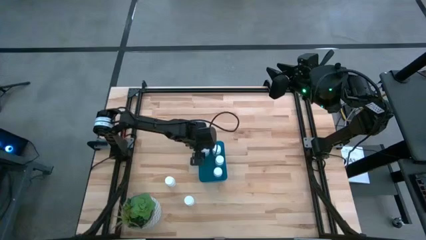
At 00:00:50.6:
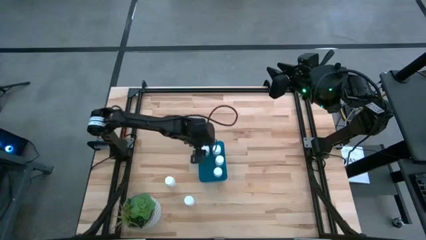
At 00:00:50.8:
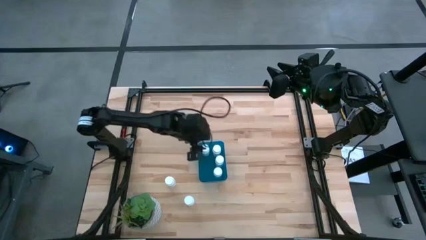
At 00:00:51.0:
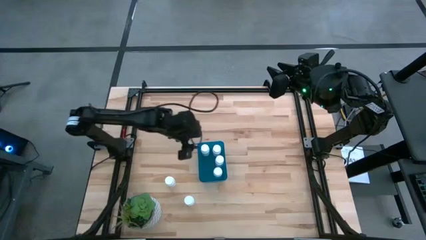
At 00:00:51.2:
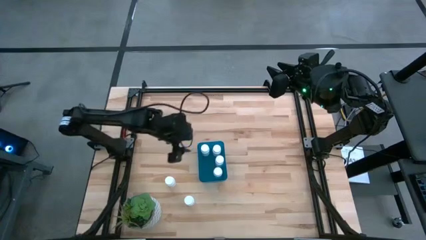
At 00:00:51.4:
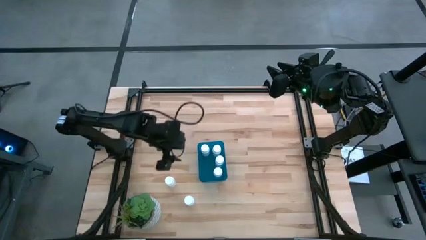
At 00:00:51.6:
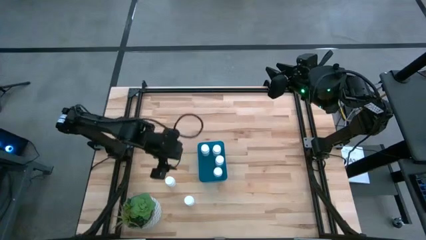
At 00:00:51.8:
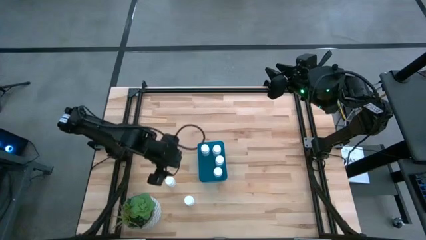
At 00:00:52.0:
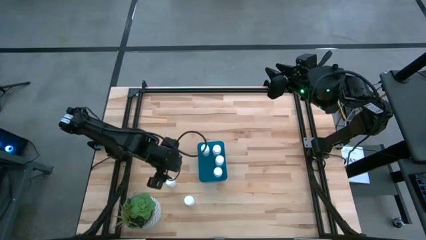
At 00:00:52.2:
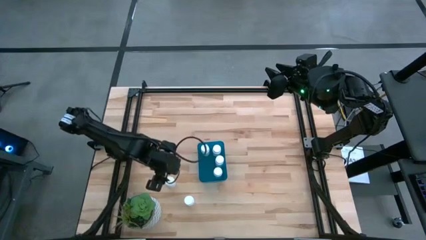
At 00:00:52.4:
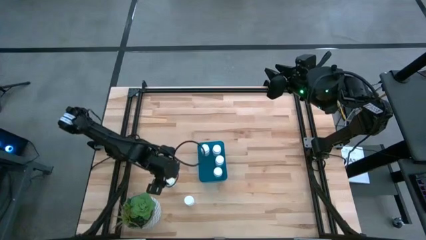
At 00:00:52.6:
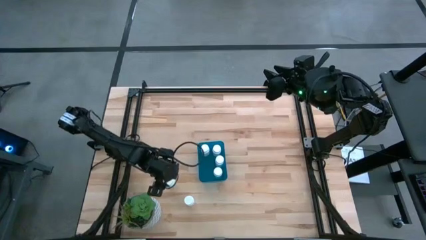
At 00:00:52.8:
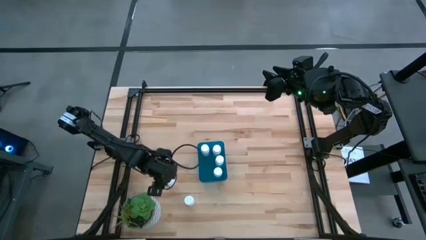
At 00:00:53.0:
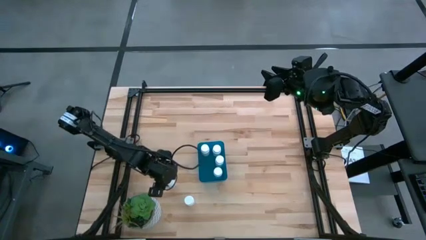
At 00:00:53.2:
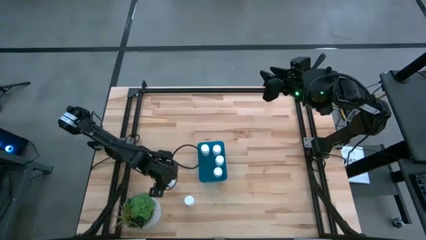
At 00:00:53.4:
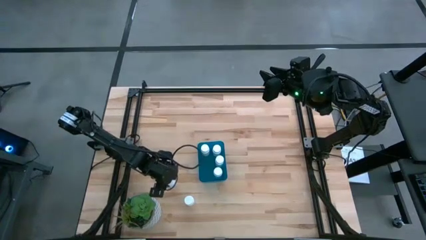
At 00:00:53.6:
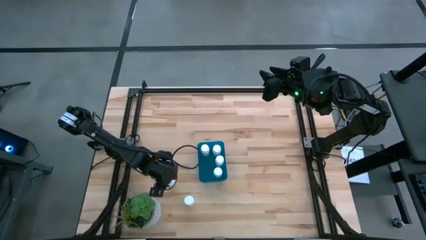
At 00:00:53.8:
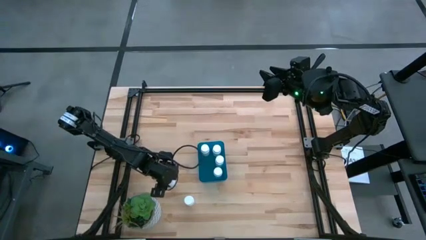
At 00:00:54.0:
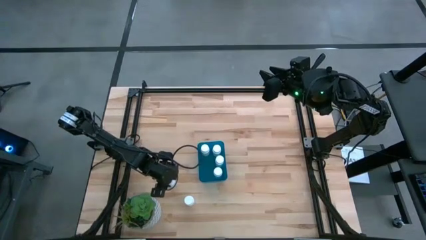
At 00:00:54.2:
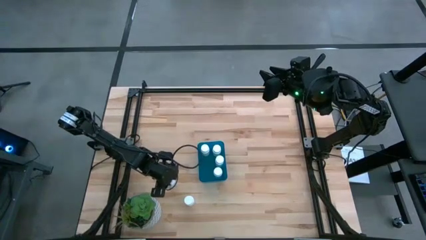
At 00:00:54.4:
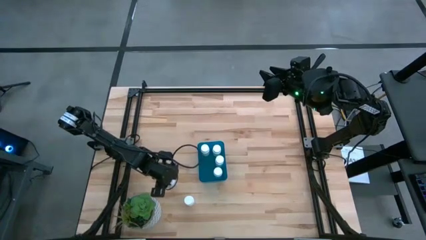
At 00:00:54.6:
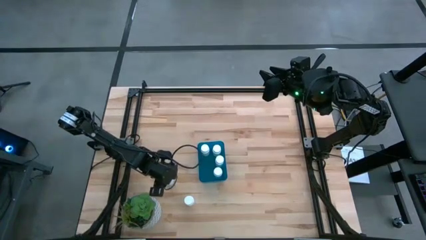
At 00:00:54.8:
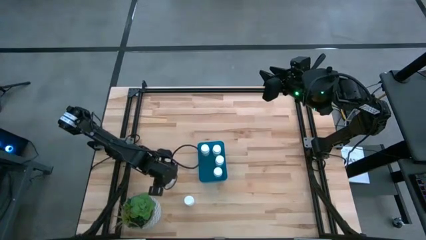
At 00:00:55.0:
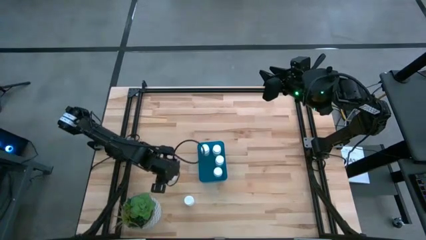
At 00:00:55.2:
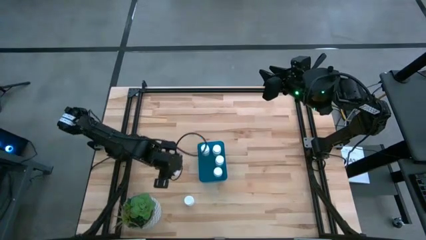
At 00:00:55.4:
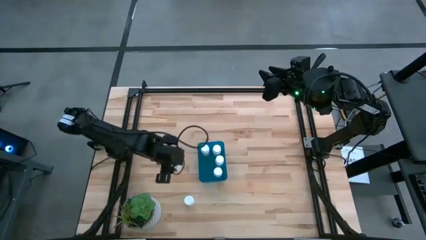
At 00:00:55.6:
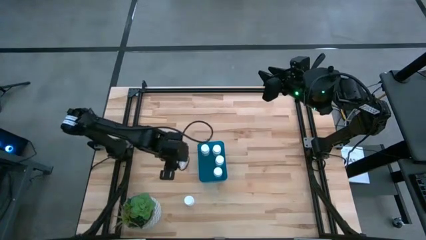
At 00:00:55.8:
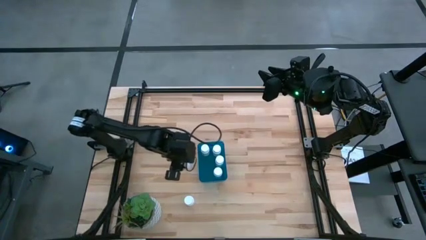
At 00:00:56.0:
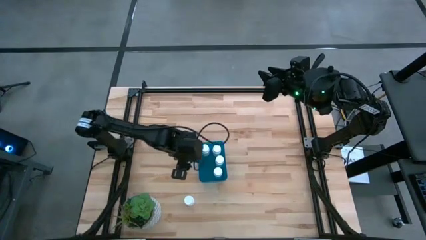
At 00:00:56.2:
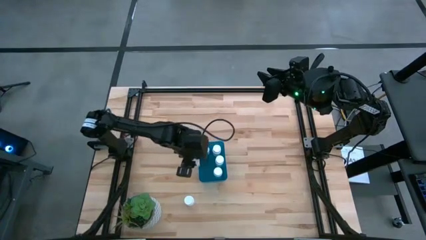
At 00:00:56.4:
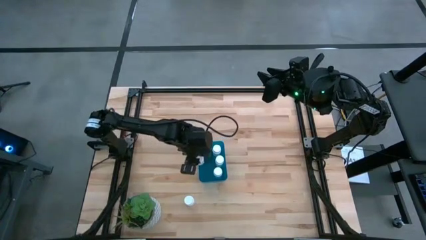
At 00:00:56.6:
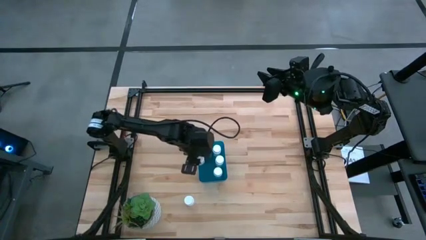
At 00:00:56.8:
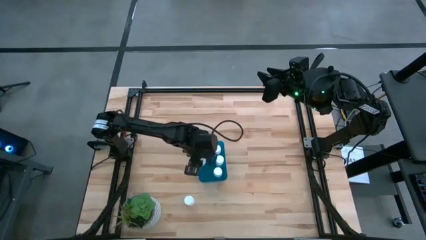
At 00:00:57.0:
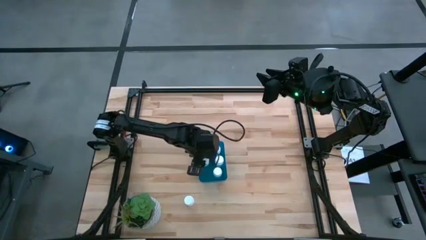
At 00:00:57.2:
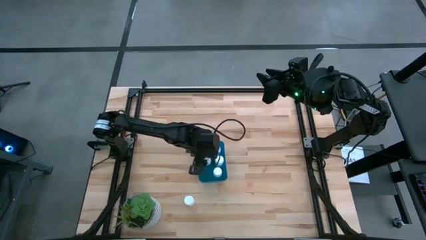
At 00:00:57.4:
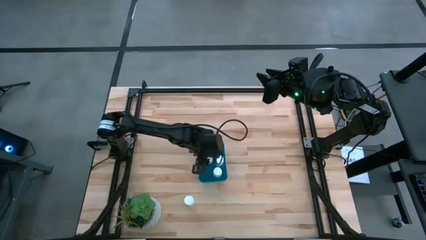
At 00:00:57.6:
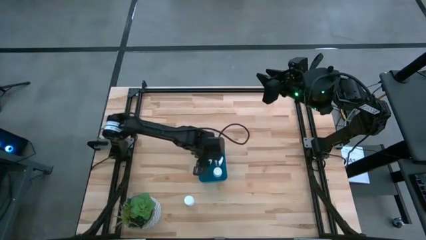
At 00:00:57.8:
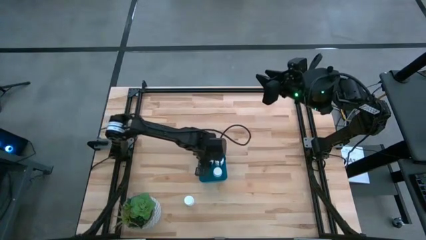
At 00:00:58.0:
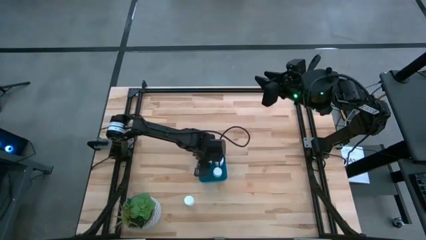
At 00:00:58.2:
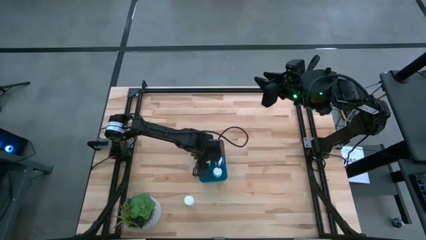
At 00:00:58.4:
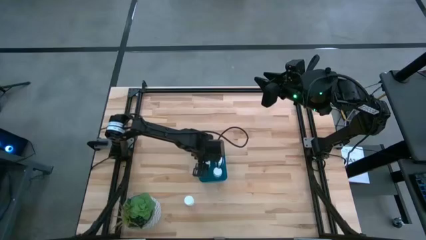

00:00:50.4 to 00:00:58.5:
Task: Pick and place pill bottles into a basket
Put the top pill bottle into the bin

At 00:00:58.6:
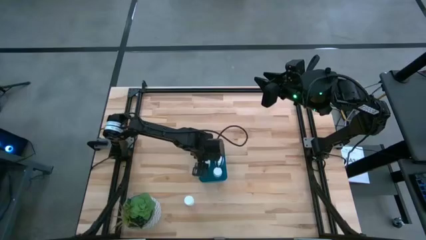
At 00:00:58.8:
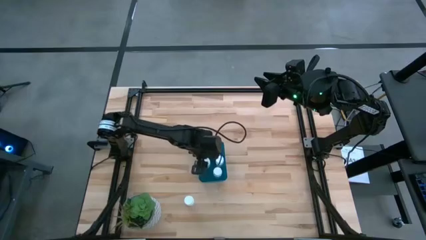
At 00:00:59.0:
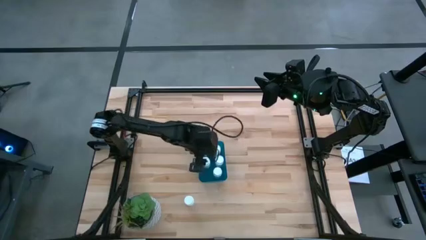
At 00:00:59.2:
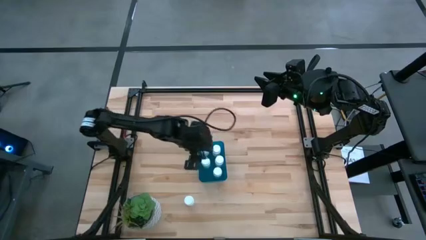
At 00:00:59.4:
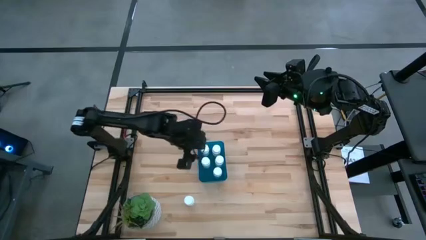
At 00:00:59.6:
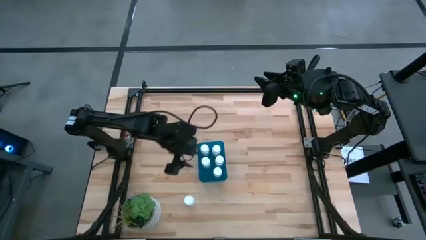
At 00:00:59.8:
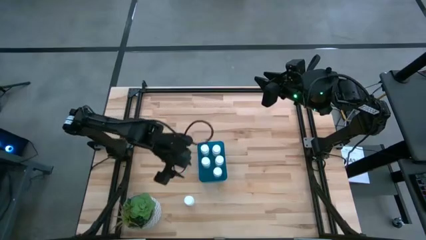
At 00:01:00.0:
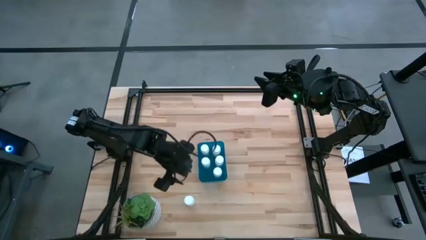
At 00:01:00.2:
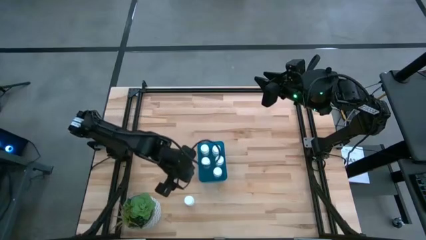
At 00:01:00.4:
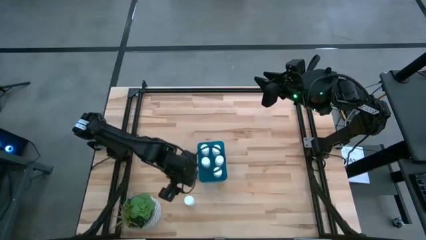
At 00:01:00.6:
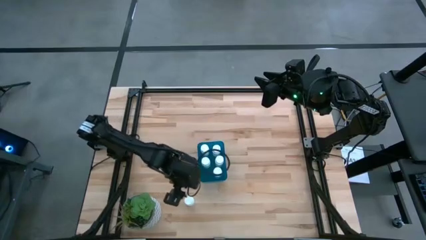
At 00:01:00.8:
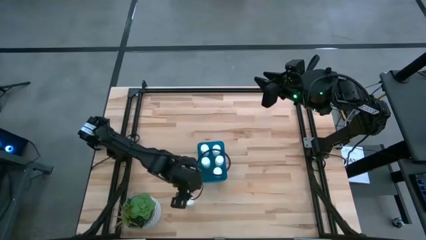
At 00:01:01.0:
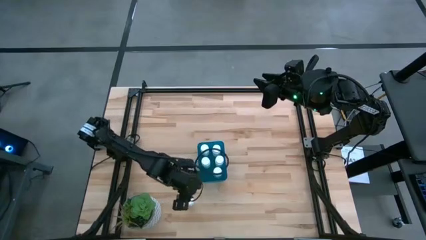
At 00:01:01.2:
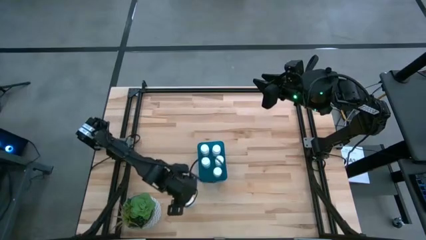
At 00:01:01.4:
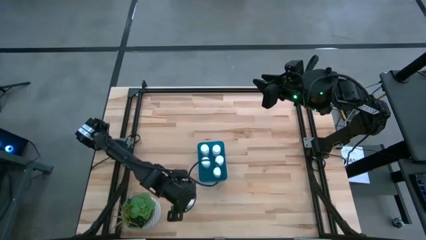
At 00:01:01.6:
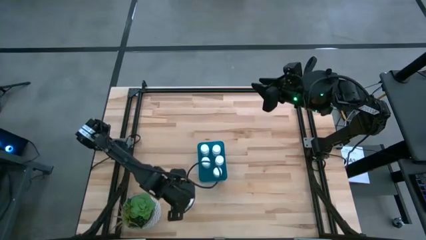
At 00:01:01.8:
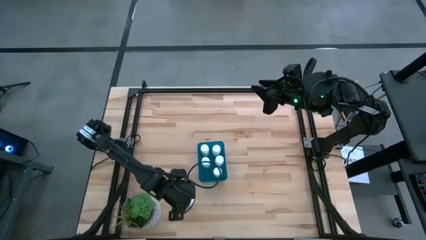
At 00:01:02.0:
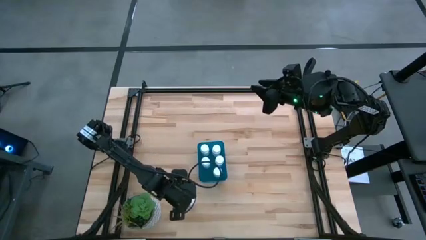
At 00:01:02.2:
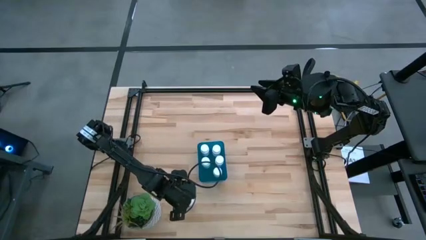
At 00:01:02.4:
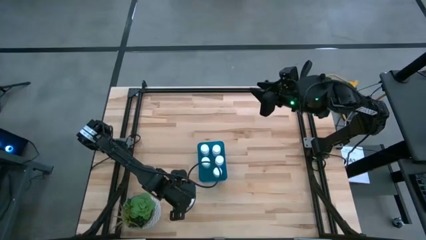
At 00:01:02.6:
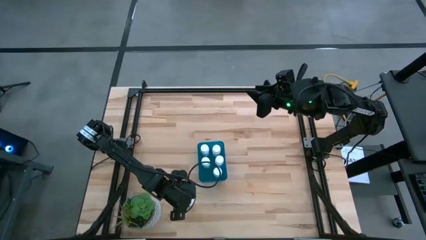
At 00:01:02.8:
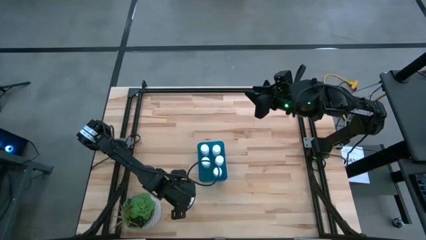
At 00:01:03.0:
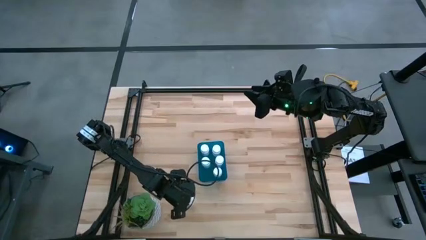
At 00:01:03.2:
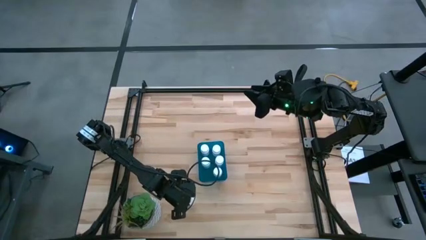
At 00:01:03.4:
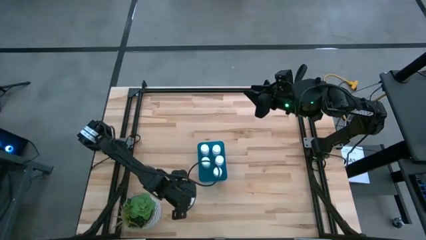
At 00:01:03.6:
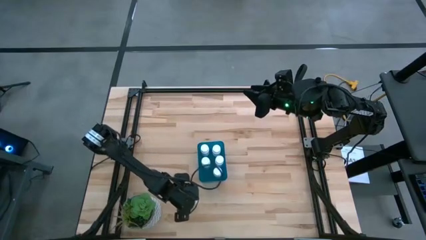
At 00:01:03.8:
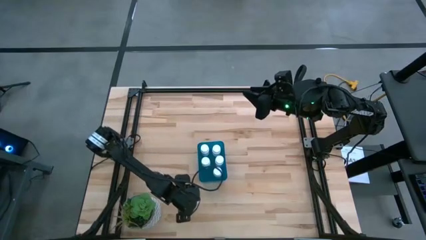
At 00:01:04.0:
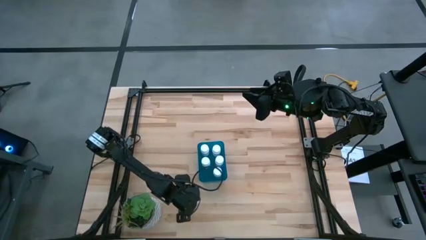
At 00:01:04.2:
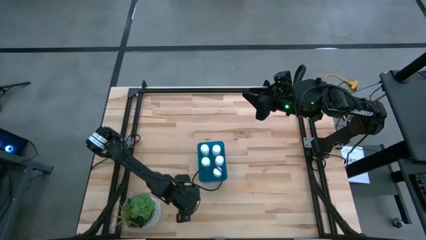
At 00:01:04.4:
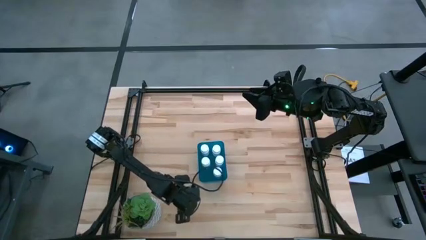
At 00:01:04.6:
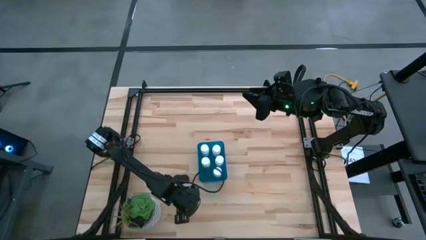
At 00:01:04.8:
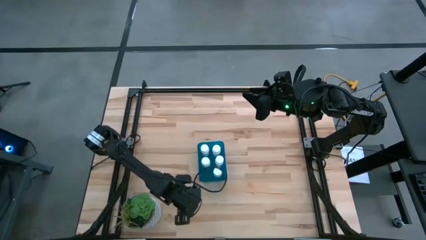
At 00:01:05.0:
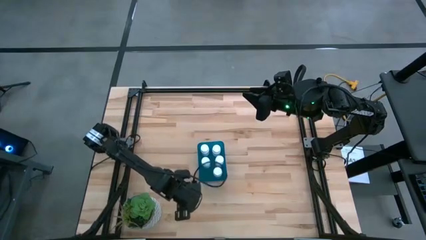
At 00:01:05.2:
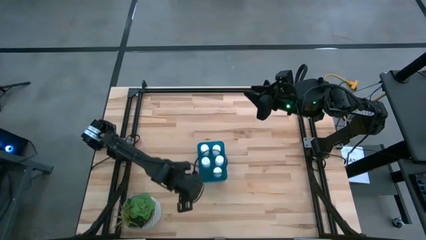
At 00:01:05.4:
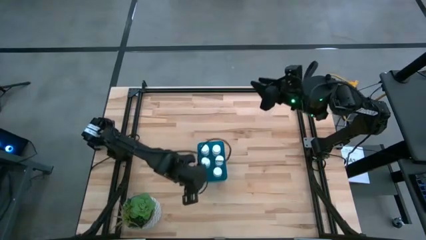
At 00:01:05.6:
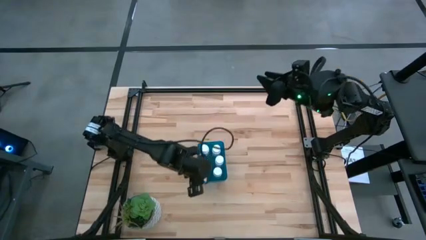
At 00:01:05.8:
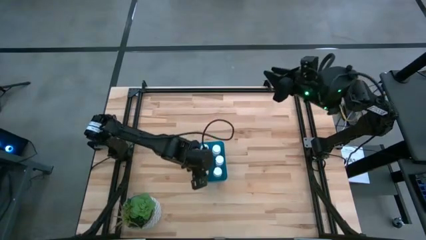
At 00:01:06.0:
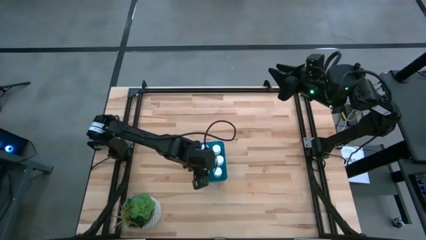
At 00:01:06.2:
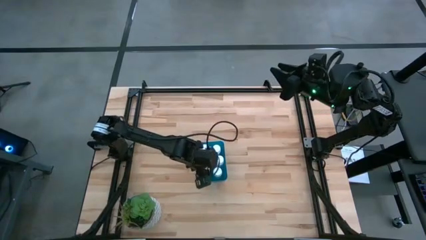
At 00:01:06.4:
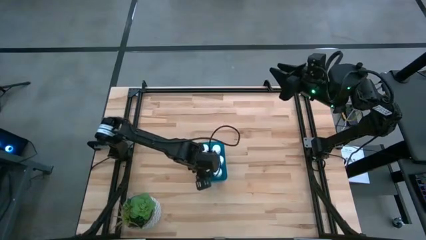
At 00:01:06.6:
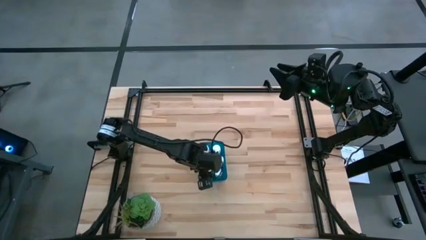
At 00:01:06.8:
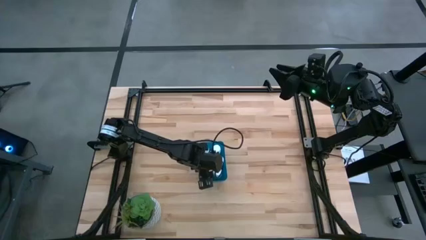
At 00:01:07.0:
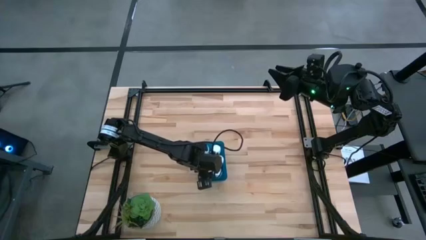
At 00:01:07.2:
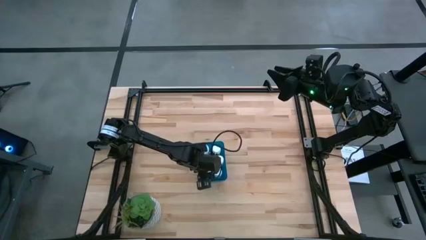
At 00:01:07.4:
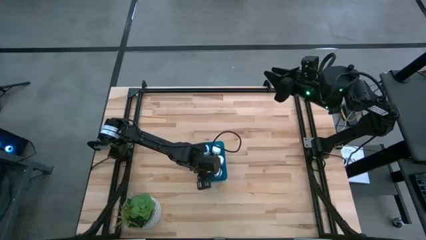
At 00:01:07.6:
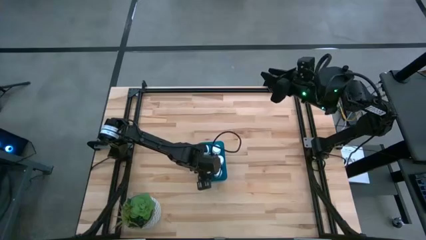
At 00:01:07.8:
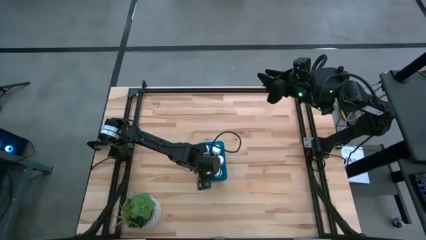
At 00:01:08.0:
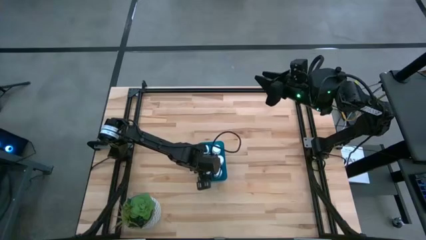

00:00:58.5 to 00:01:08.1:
Put the pill bottle into the bin
